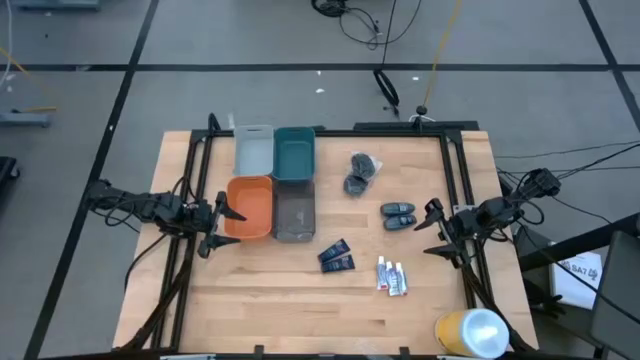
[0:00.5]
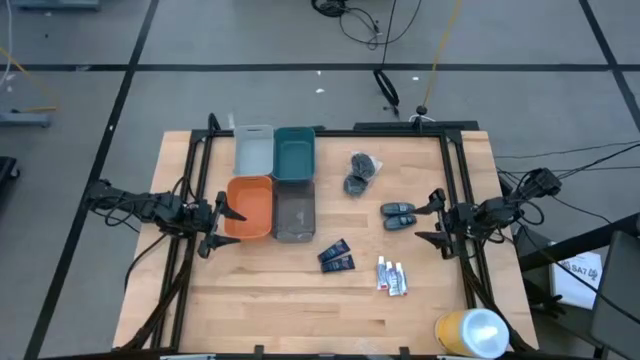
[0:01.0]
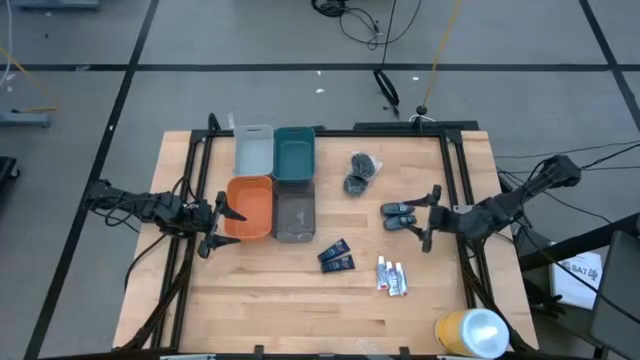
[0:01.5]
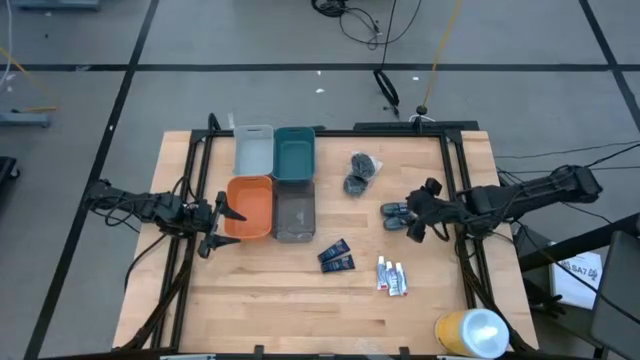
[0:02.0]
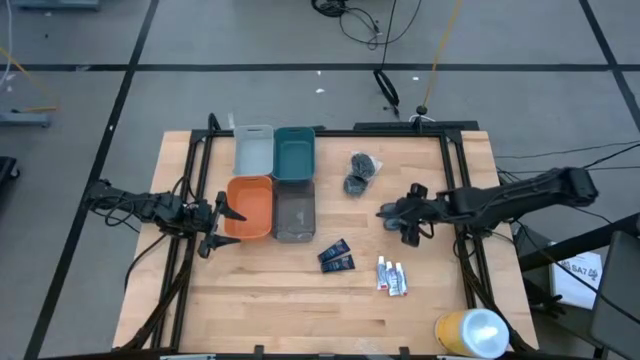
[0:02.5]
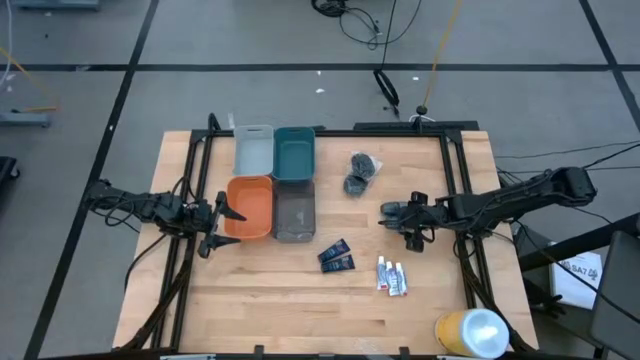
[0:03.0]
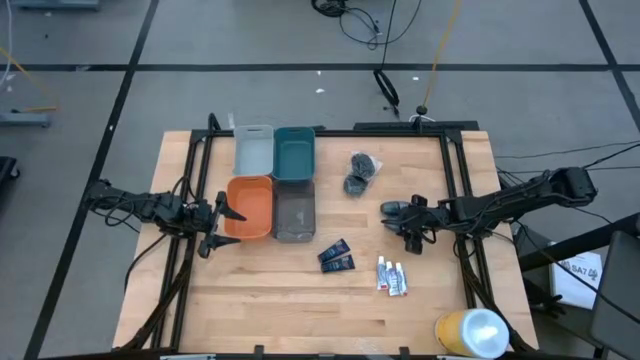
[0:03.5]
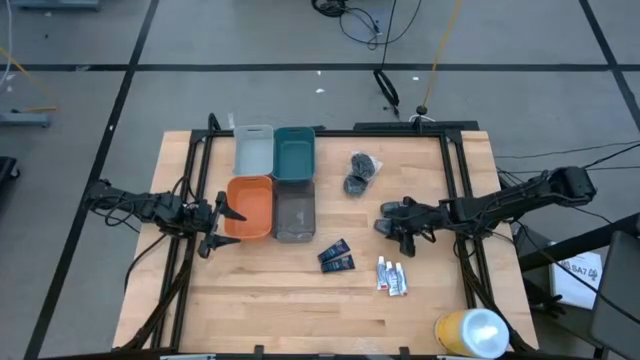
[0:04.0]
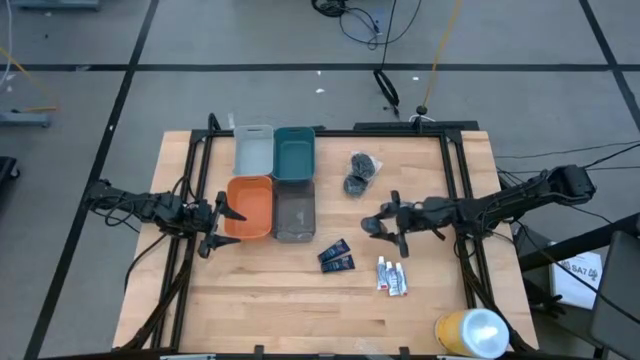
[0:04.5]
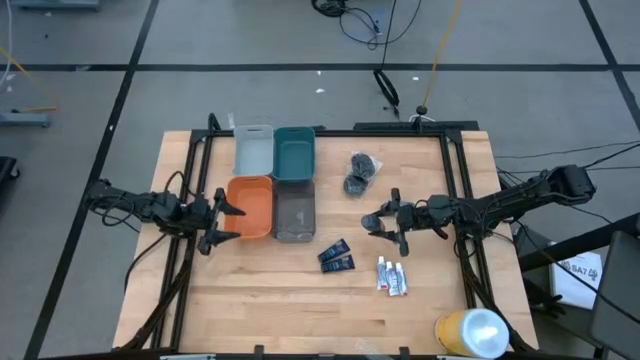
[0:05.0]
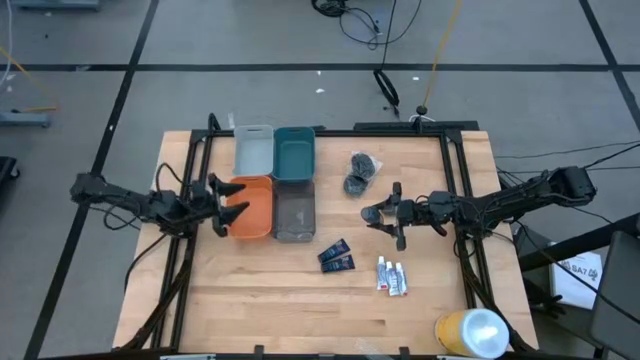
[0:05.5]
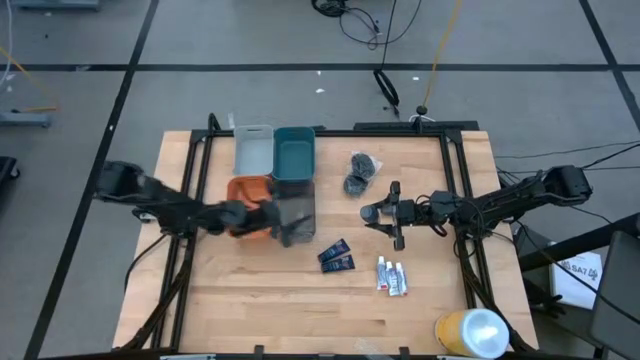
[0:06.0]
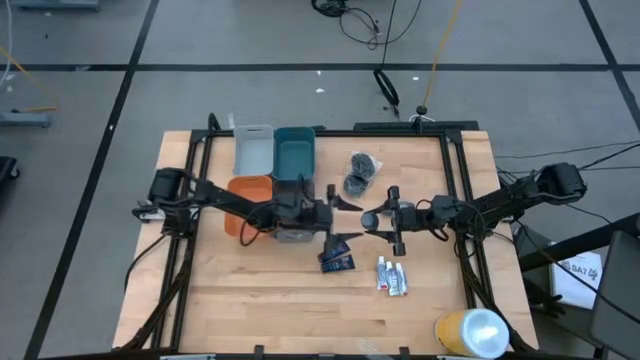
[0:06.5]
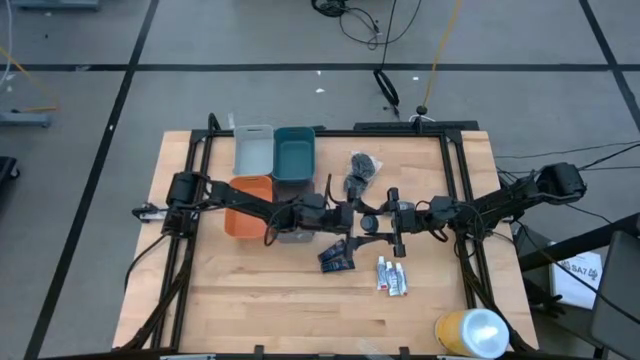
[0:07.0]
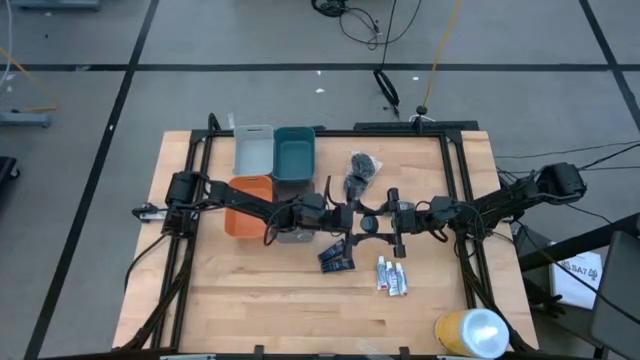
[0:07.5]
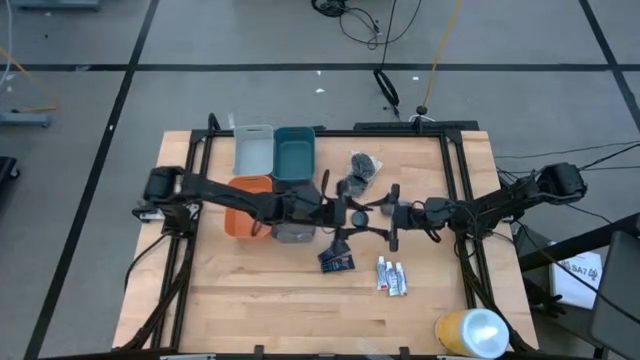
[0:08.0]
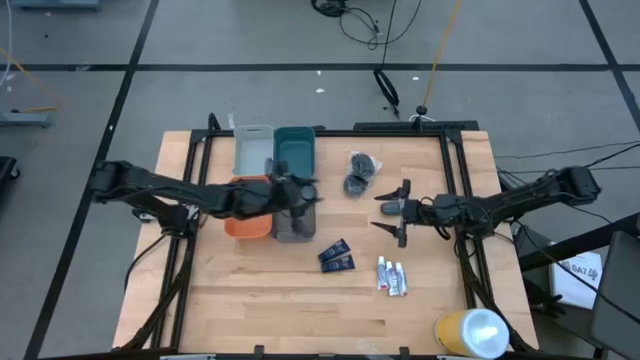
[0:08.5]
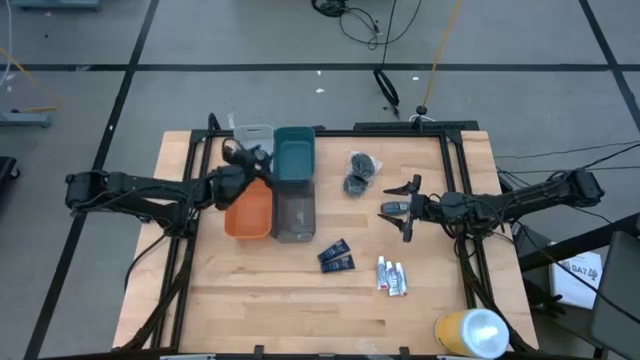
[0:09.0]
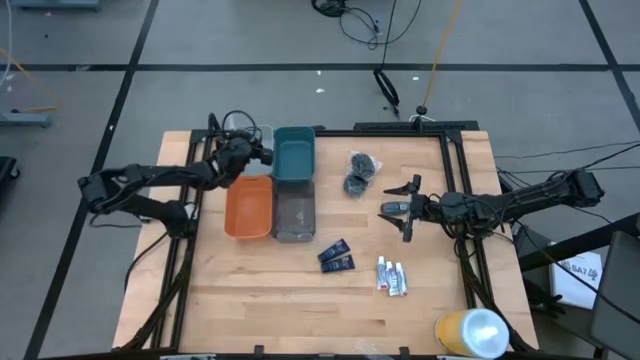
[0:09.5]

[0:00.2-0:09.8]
Task: Pick & Place Travel size toiletries
Put the bottom black deodorant into the gray bin

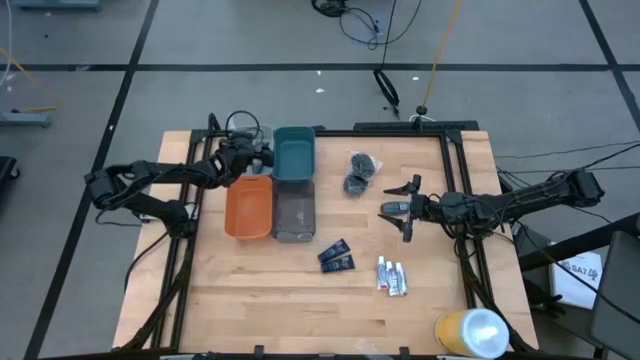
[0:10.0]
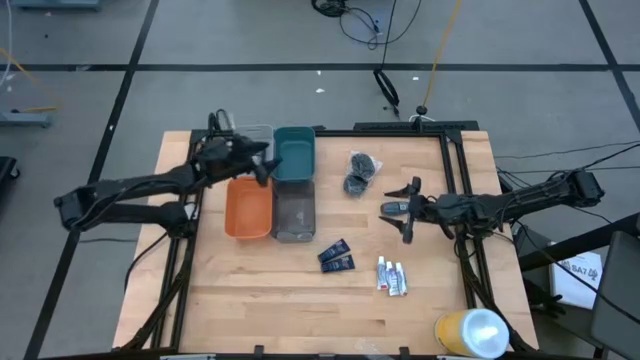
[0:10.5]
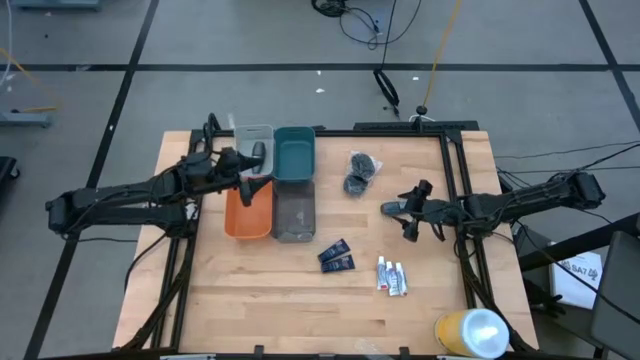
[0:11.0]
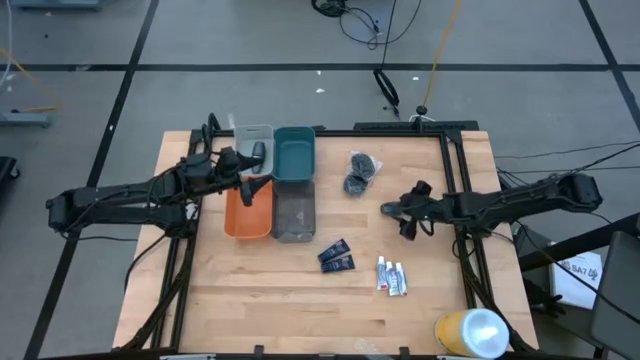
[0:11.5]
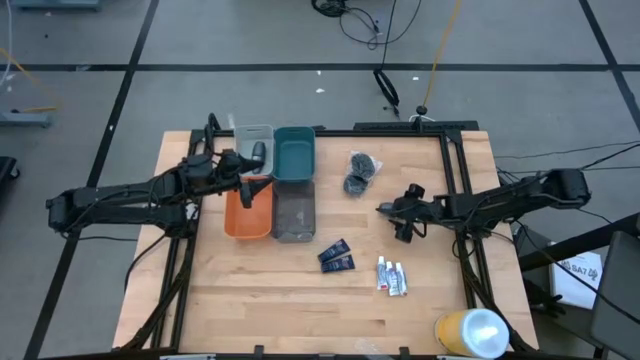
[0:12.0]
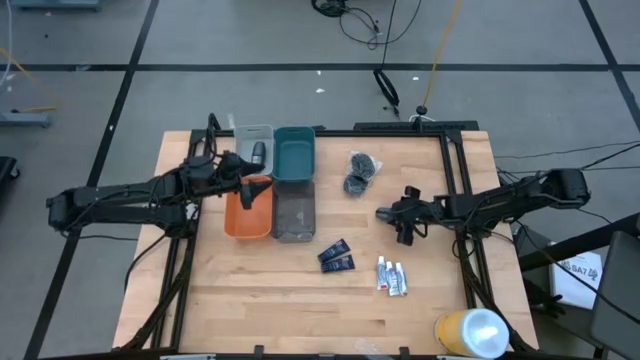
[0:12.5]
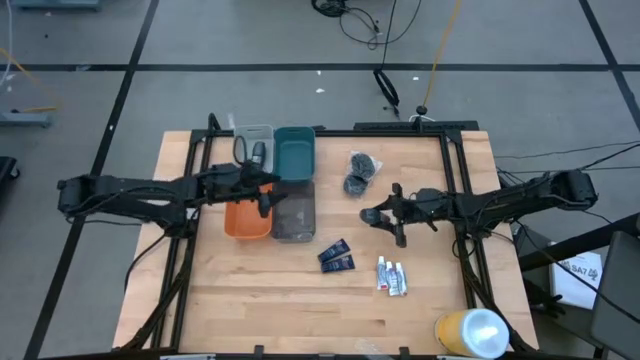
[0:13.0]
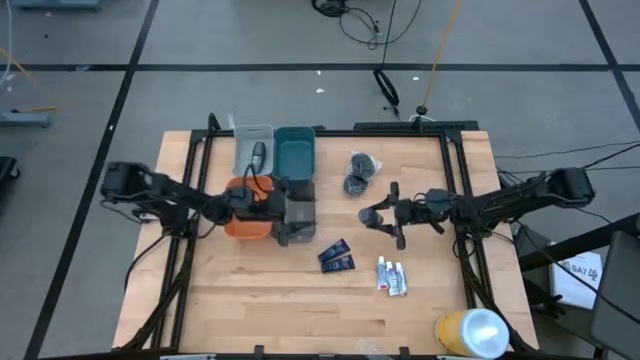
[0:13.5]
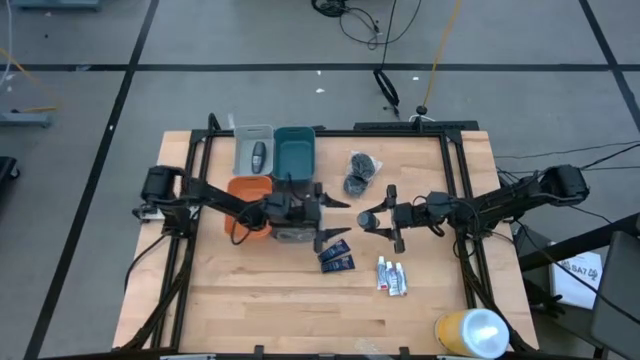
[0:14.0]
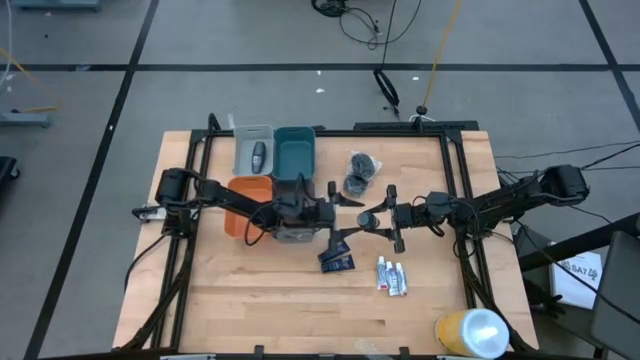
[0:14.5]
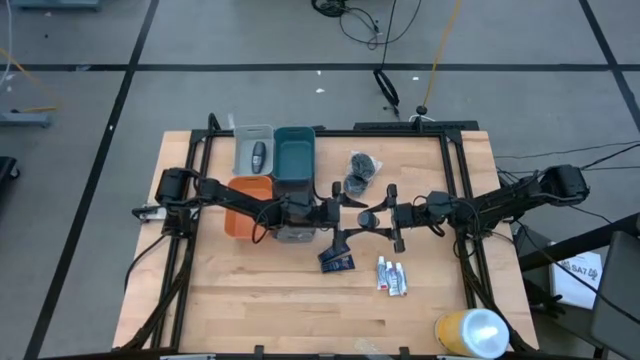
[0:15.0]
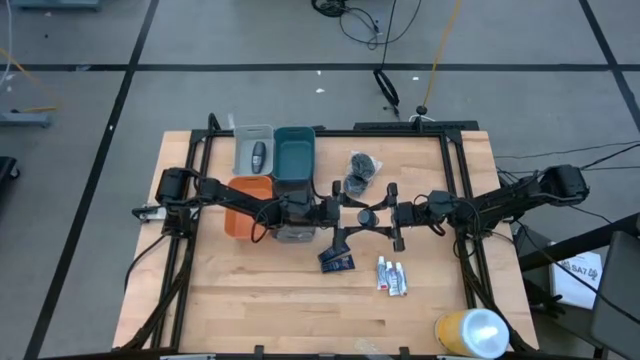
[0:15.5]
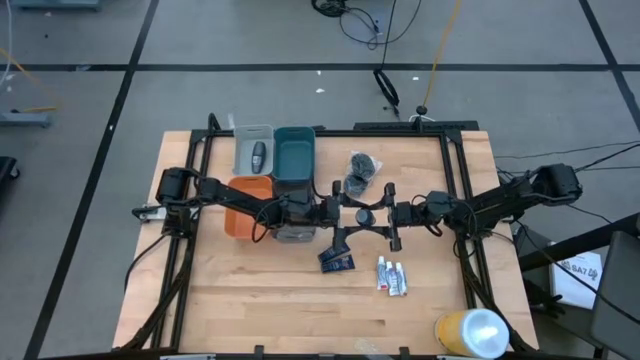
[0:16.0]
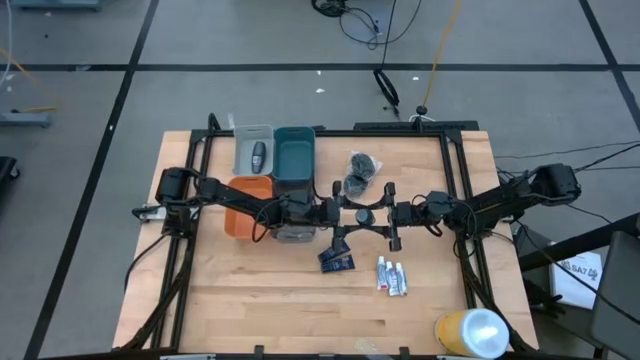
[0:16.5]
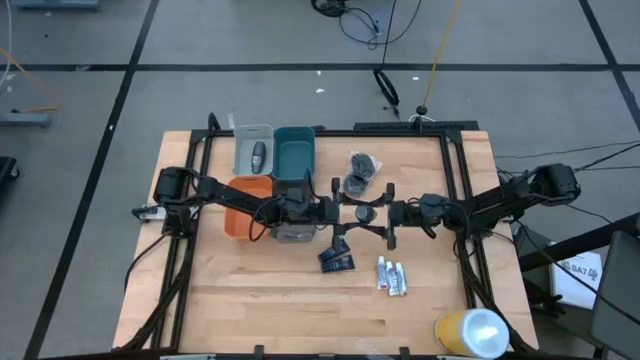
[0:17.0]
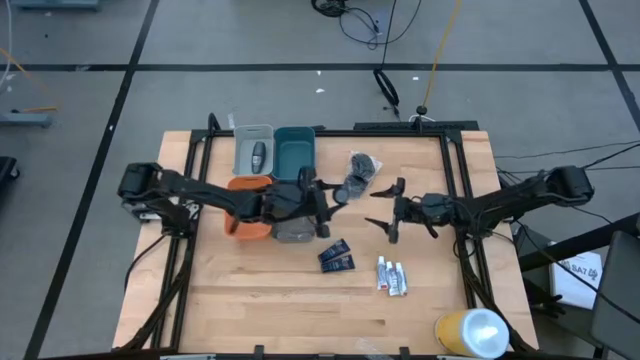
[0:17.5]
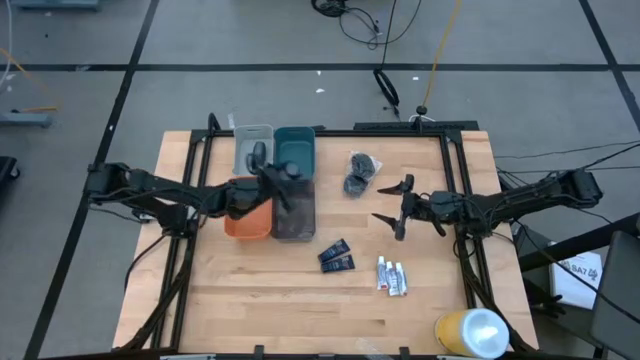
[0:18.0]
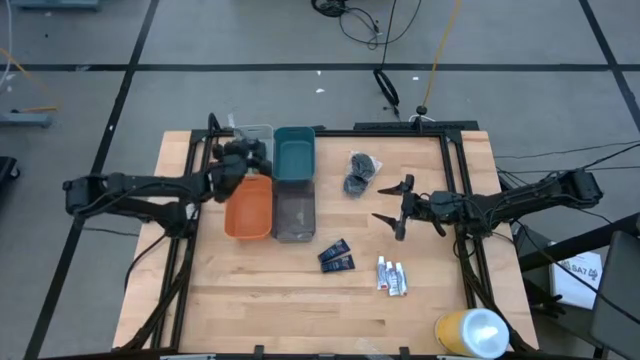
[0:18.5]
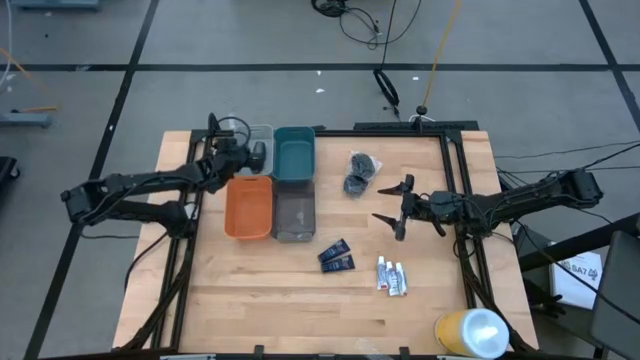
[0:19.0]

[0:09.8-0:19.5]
Put the black deodorant into the gray bin

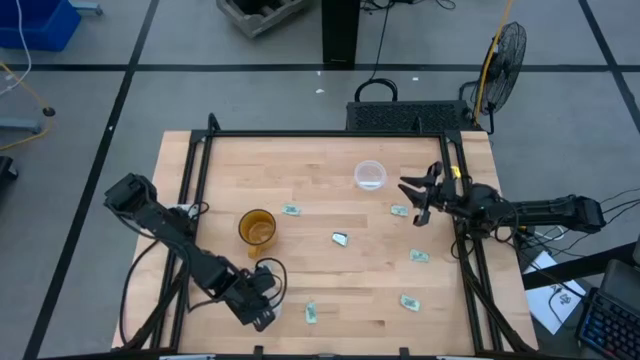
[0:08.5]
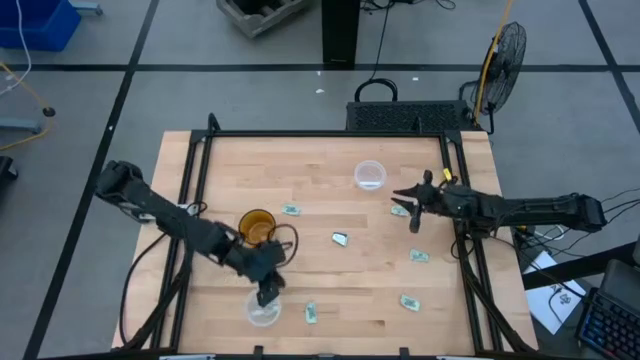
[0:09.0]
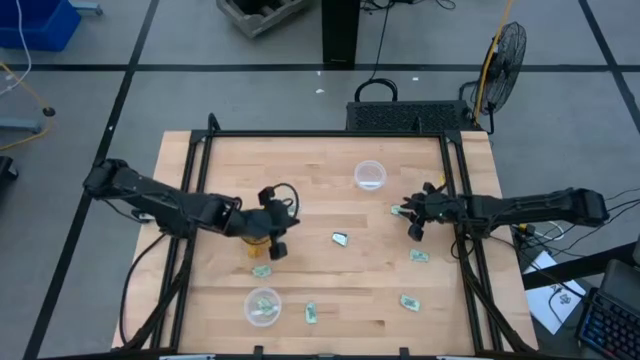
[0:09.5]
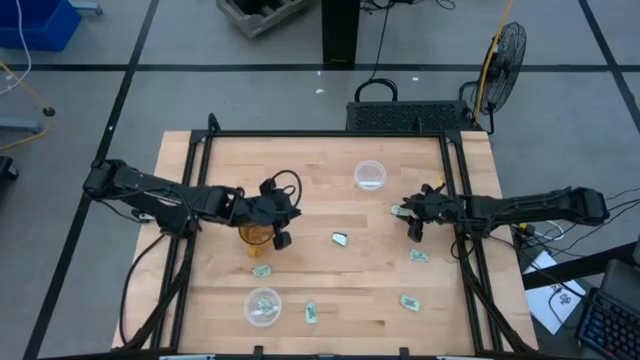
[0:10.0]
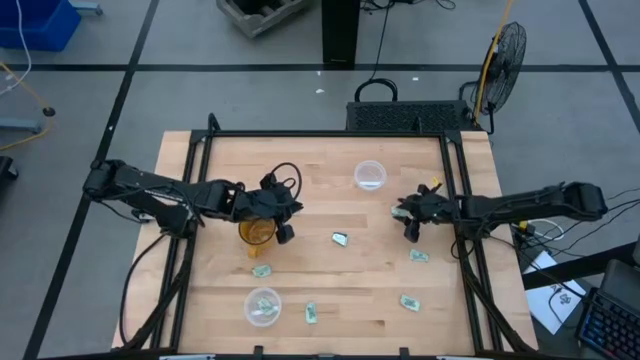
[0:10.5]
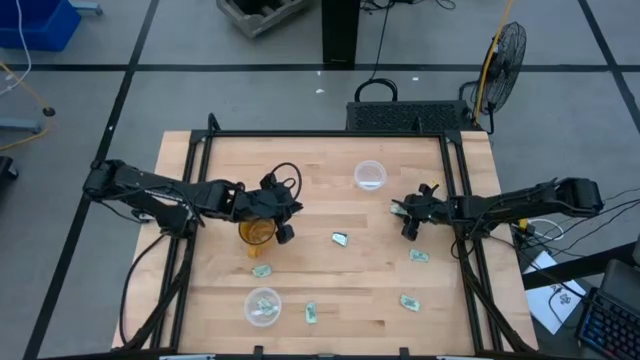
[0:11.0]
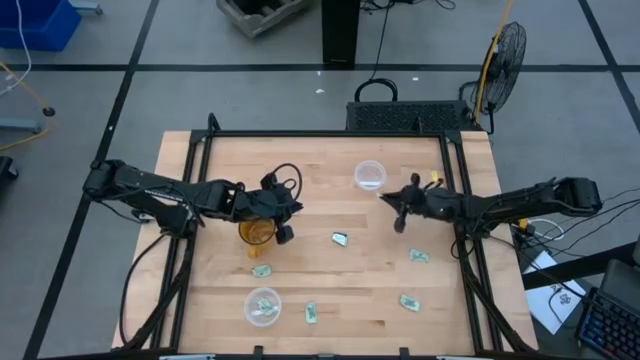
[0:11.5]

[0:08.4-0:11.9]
Task: Pick and place items into bin
Put the green stevia packet into the top transparent bin
